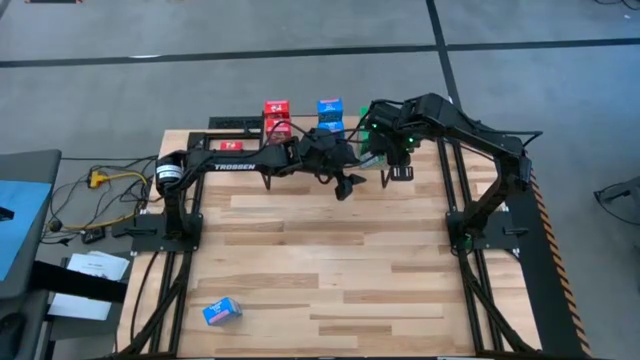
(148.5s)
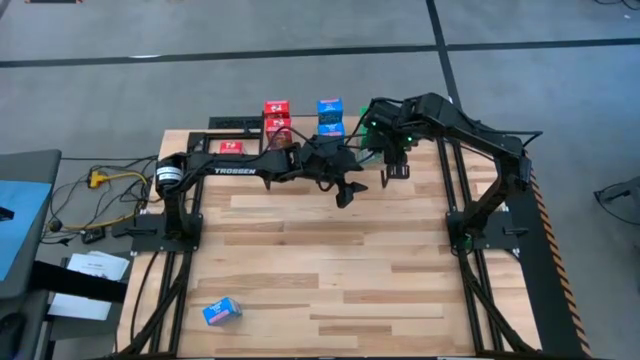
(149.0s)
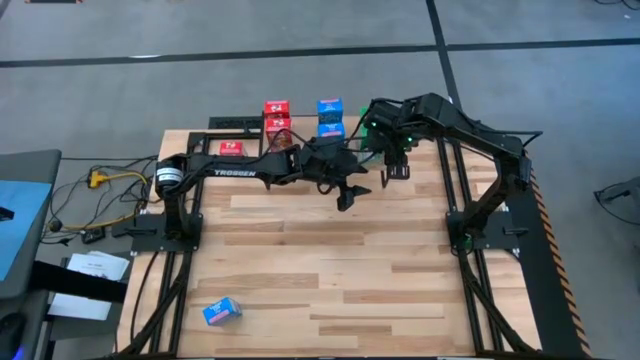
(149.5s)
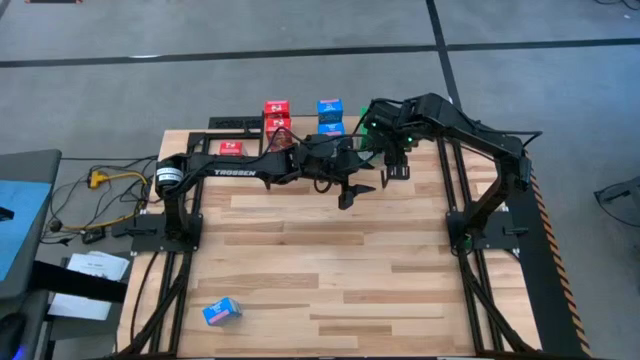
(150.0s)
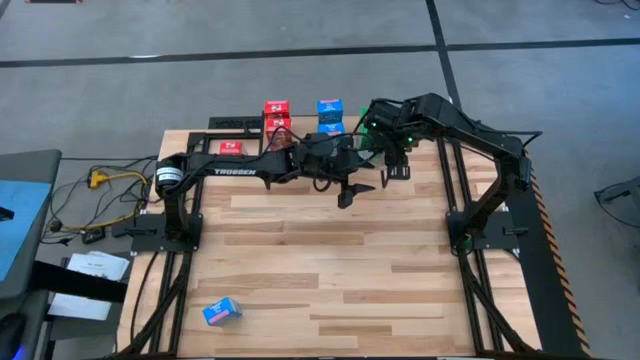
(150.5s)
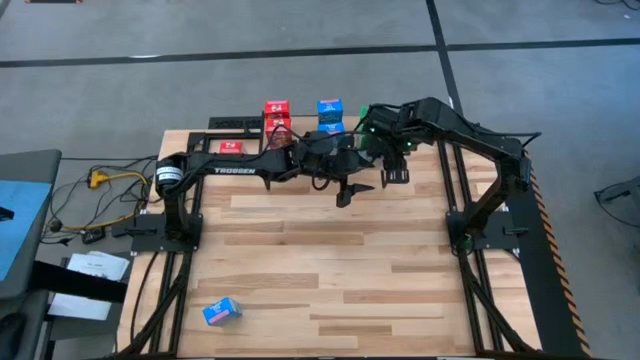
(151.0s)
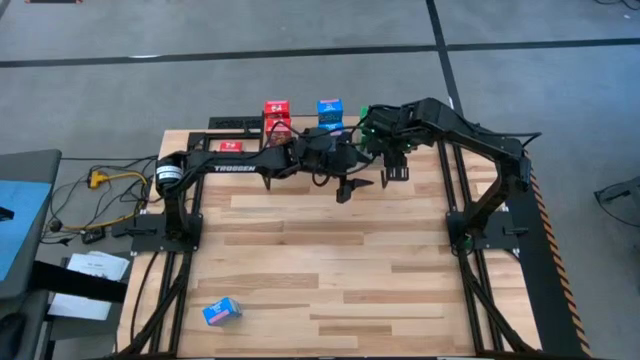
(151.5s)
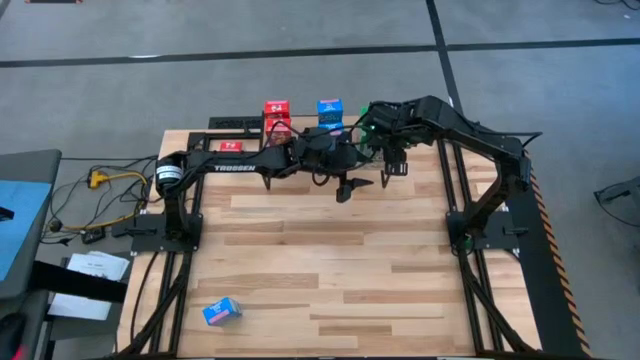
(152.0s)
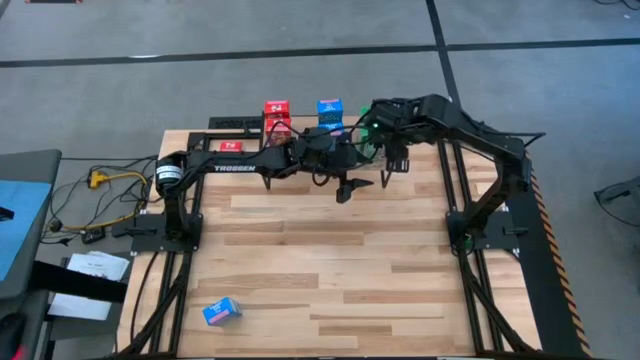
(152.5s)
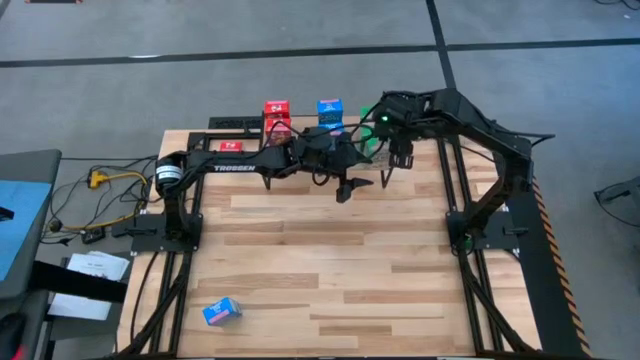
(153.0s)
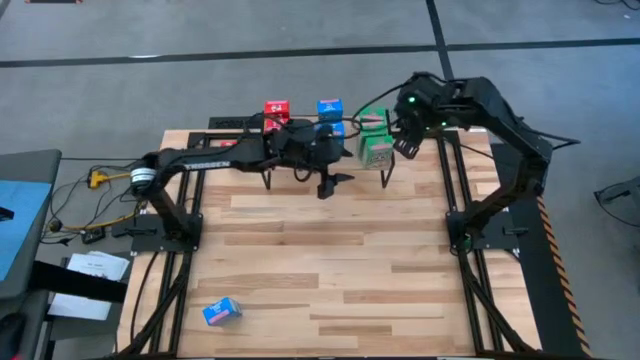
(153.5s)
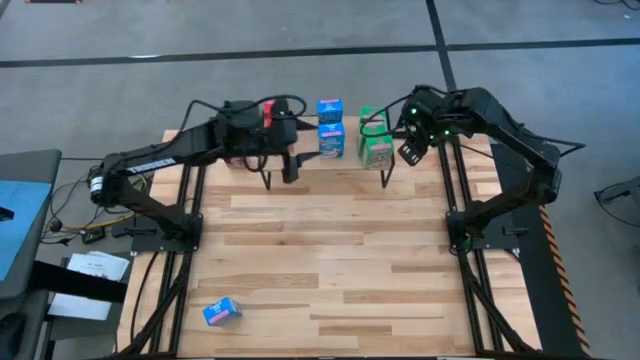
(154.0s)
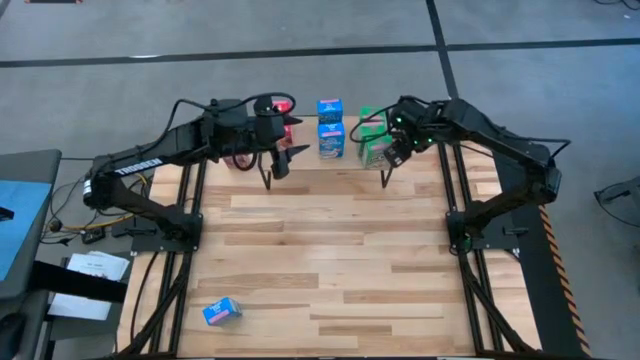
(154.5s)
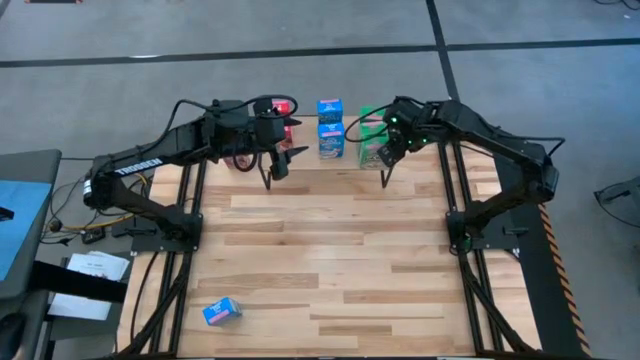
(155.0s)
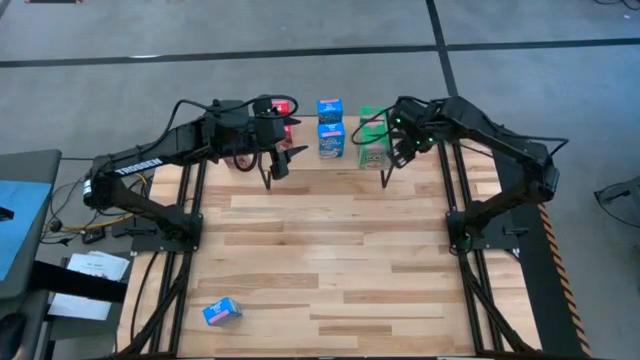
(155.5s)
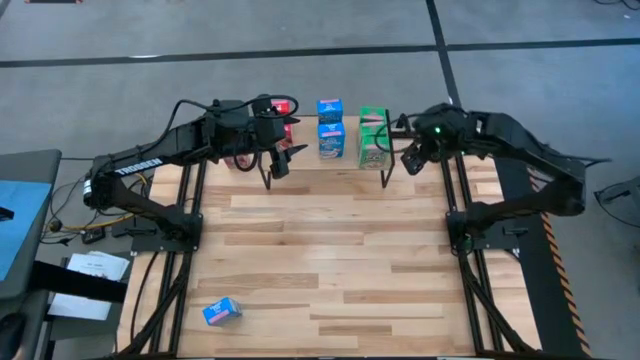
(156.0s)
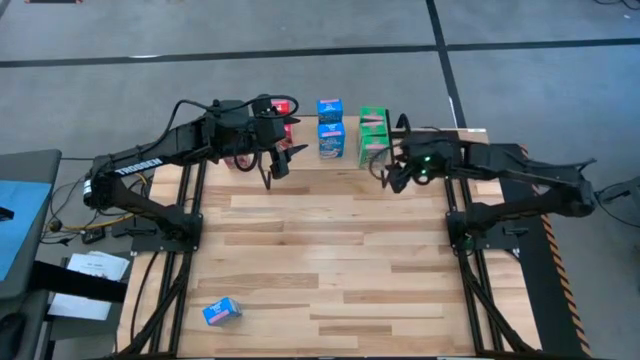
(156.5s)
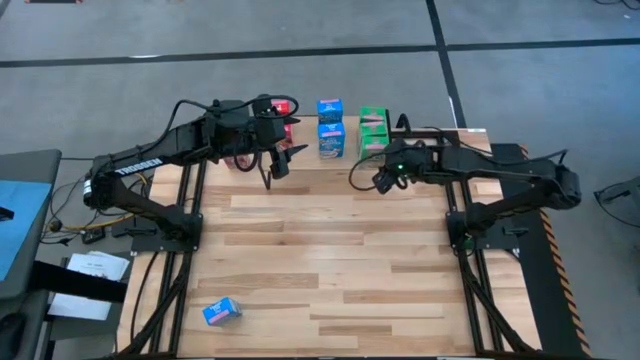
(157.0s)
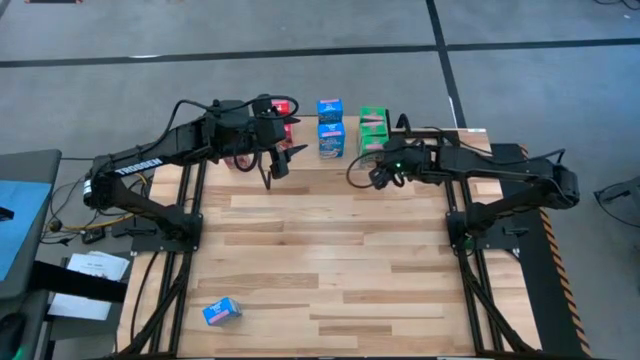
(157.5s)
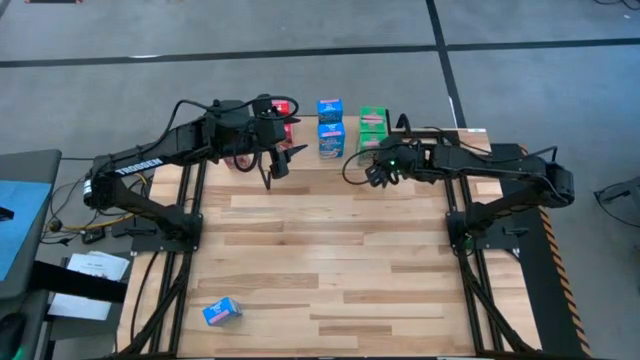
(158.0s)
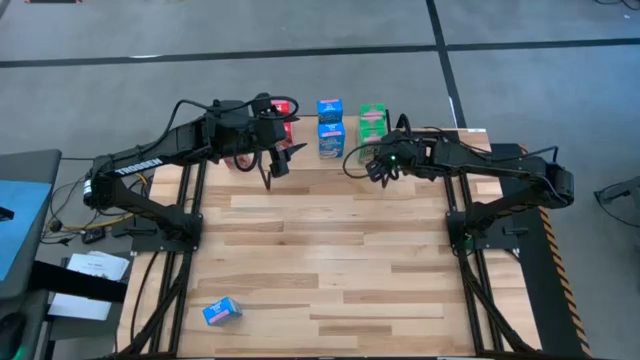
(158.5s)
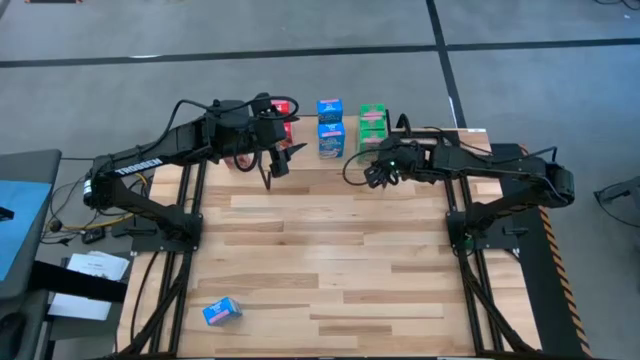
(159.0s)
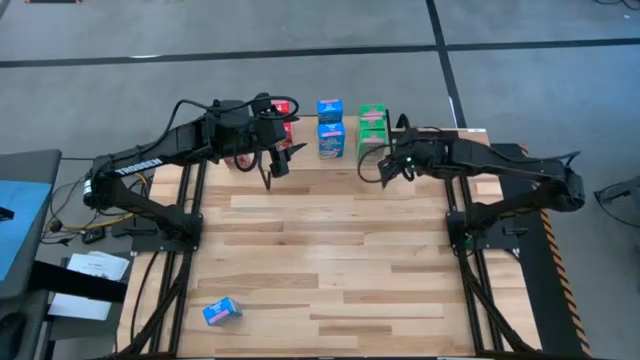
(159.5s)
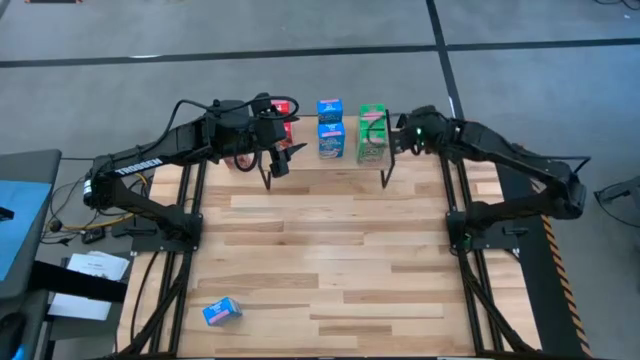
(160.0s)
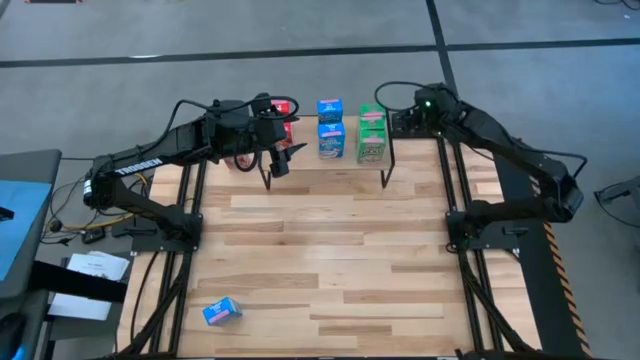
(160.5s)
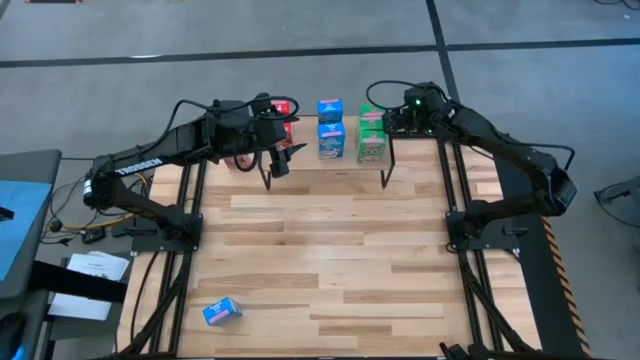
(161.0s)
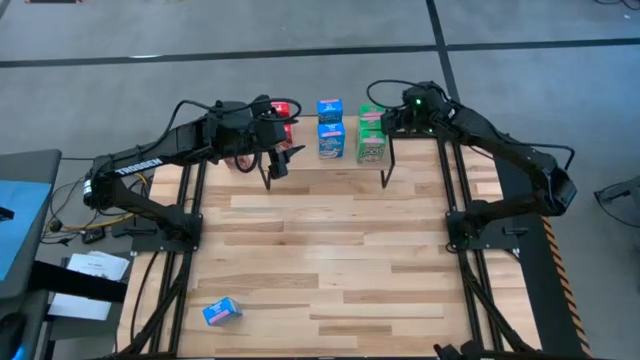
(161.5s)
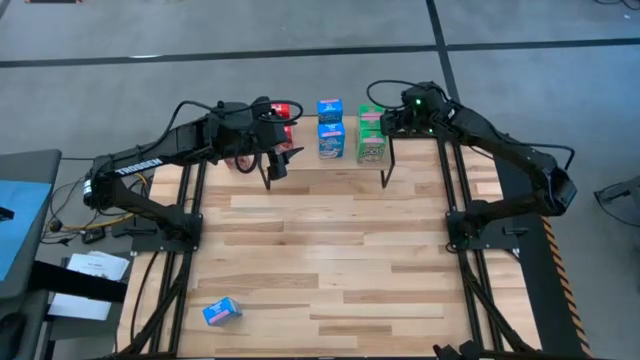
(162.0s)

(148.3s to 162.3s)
Task: Stack cereal on shelf
Put the green cereal box on the shelf aligned with the other green cereal box

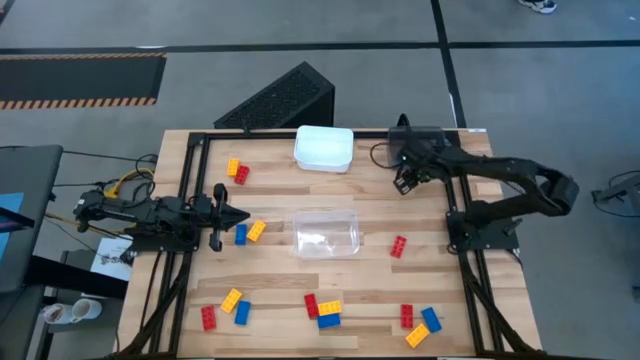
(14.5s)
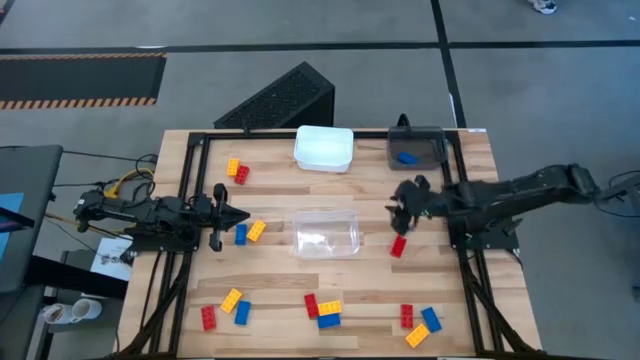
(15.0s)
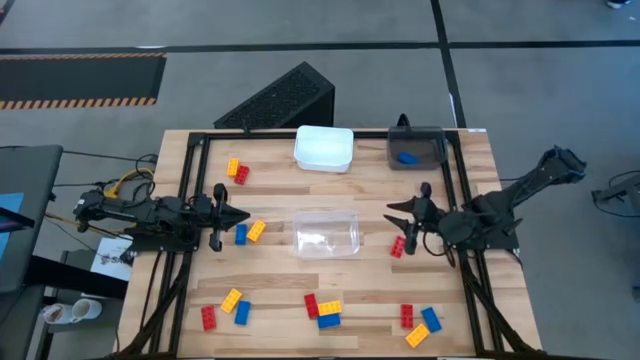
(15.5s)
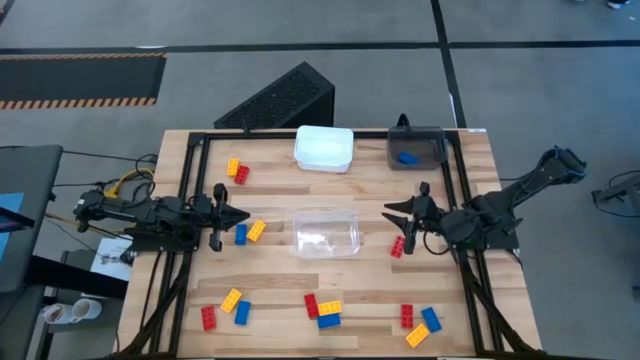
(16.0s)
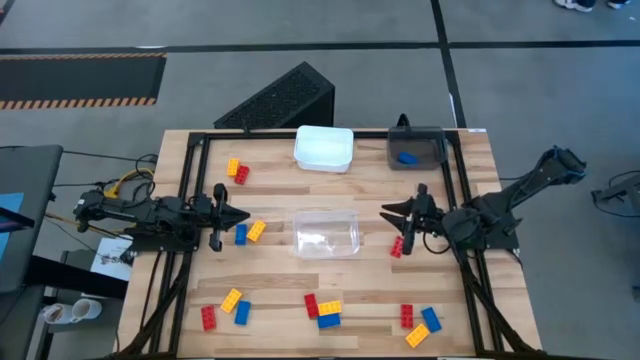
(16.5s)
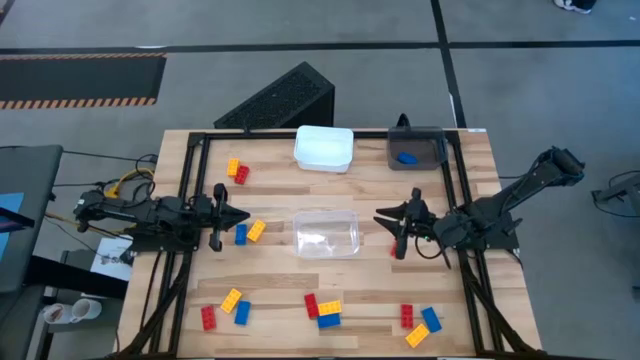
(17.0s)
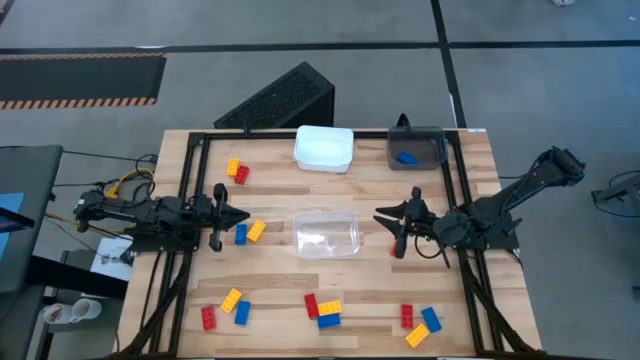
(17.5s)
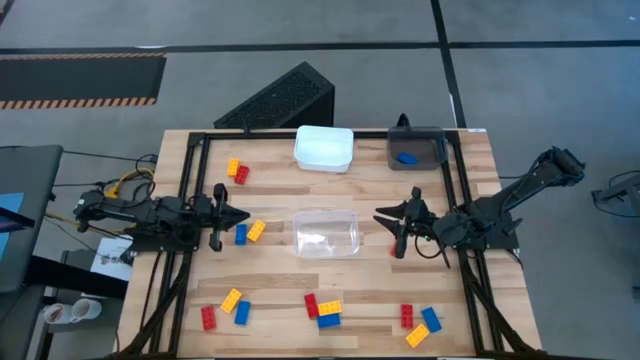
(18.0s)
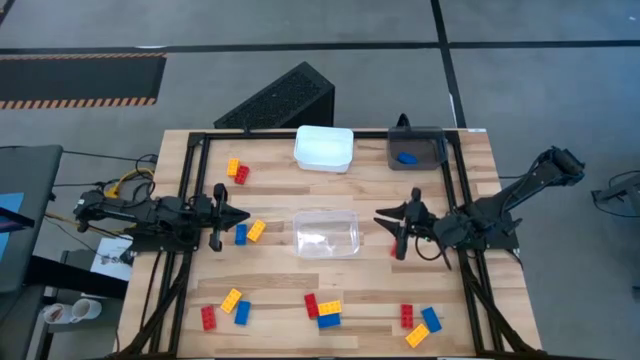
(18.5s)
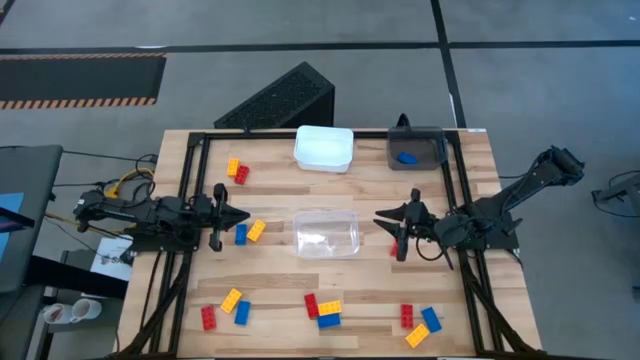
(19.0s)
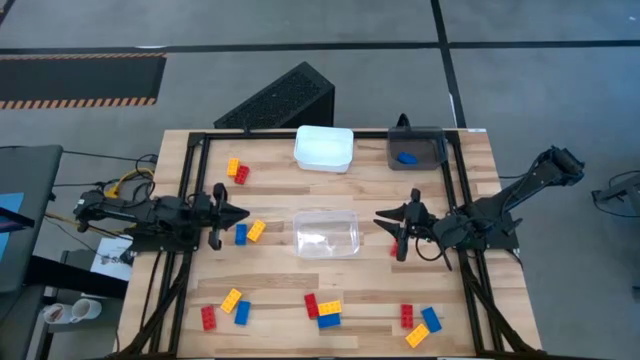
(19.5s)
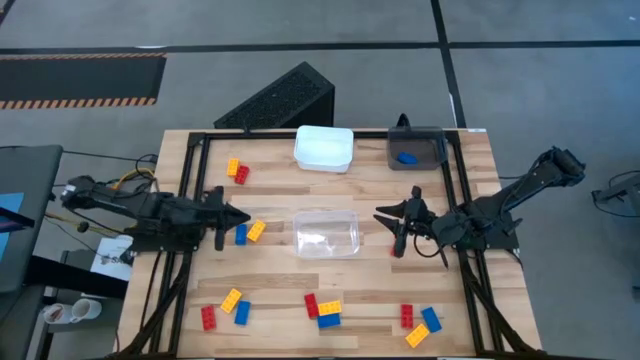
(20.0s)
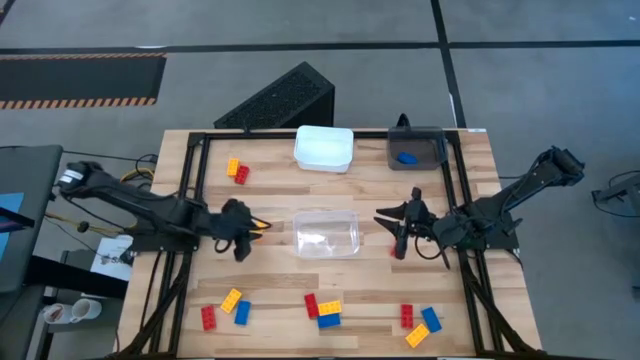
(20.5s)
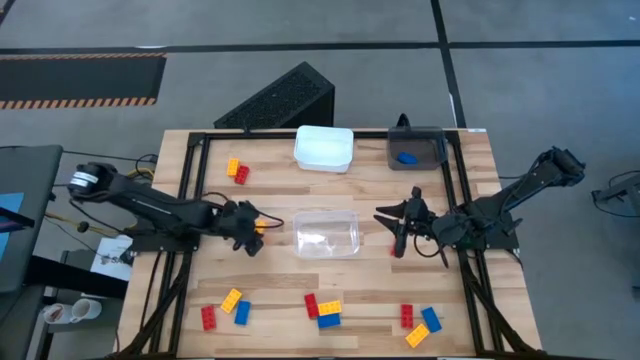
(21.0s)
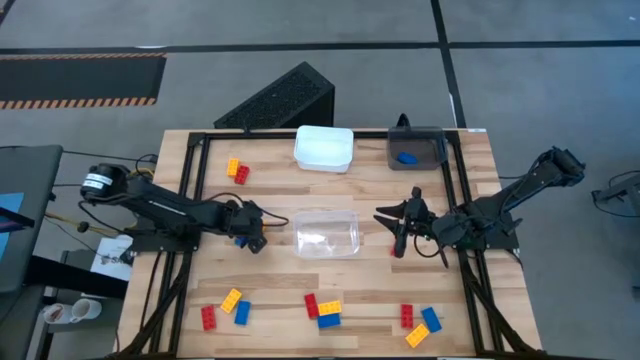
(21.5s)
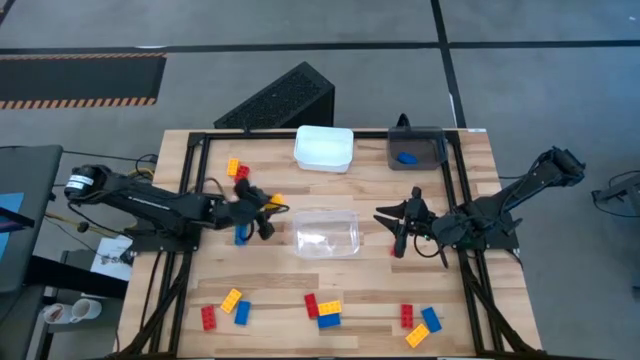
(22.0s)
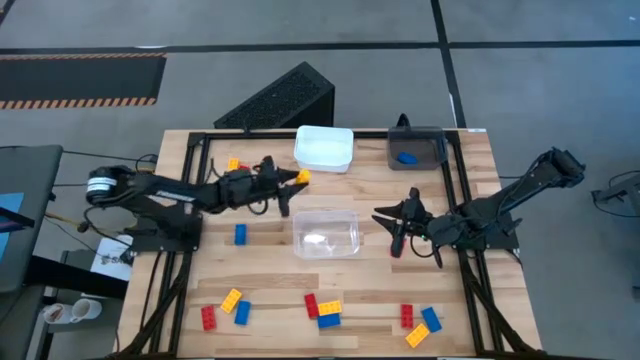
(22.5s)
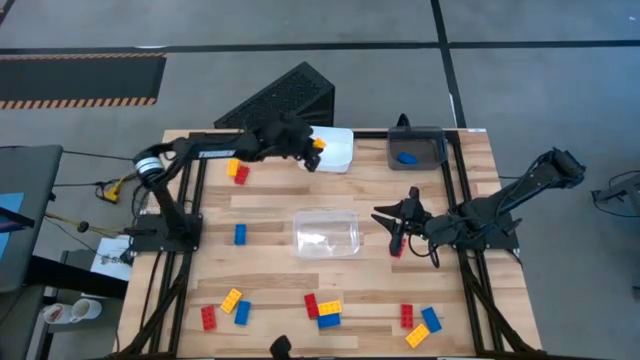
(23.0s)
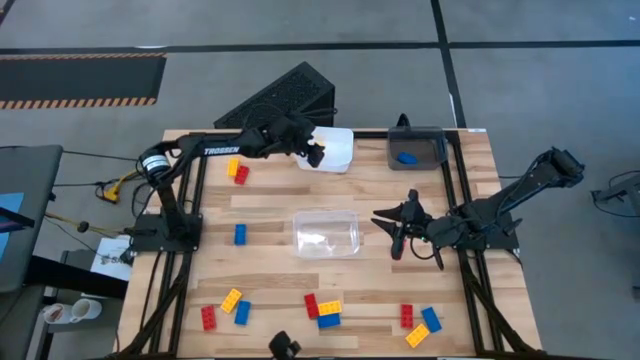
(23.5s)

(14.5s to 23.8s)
Task: Sort & place blocks by color
Put the yellow game piece into the white bin
